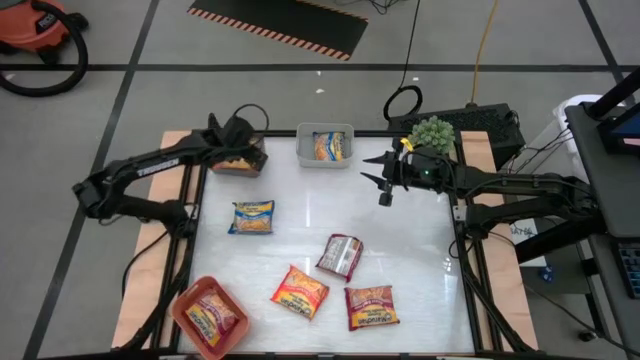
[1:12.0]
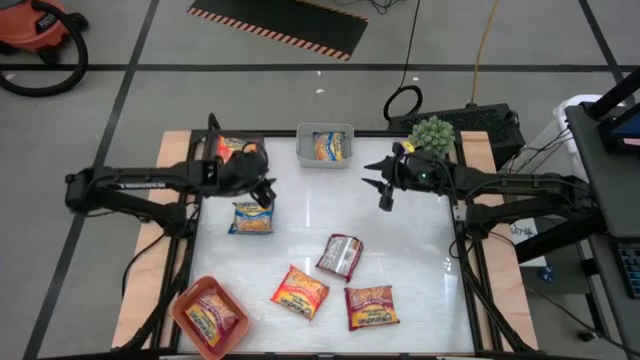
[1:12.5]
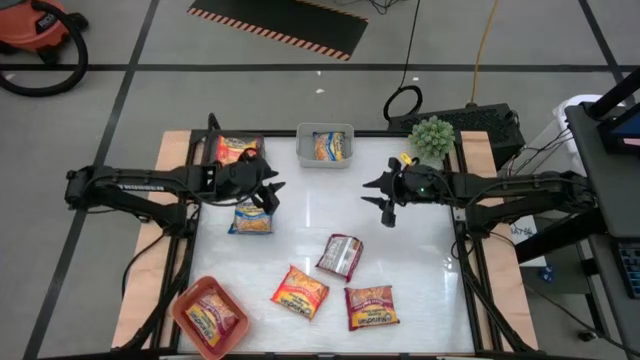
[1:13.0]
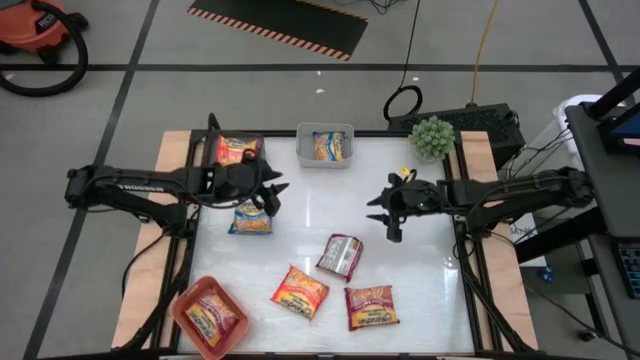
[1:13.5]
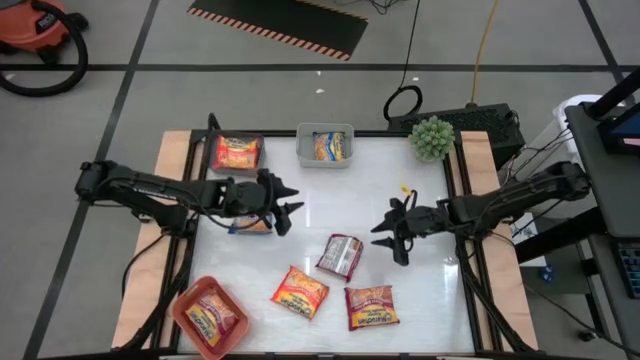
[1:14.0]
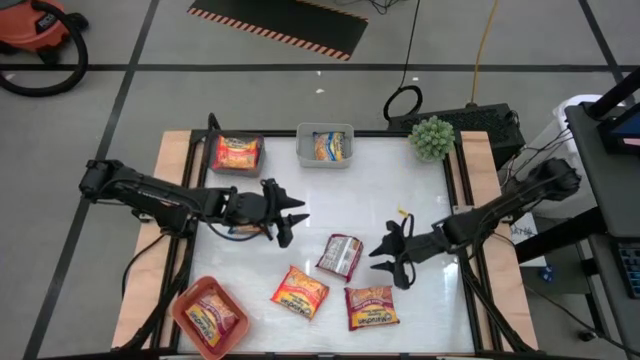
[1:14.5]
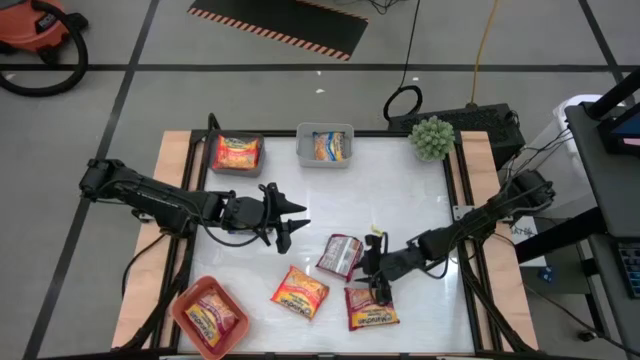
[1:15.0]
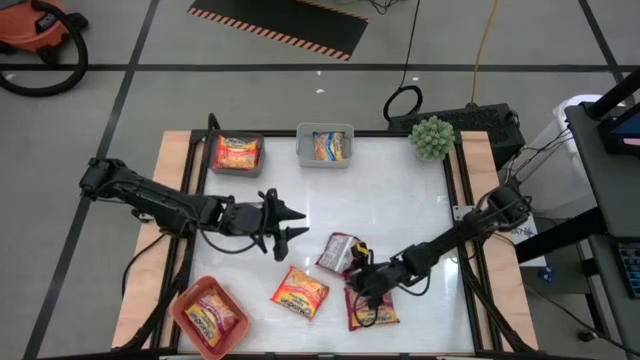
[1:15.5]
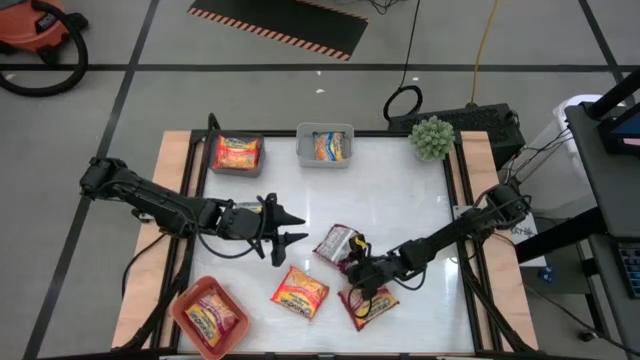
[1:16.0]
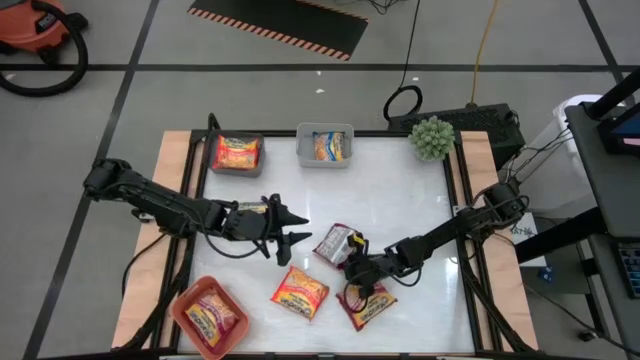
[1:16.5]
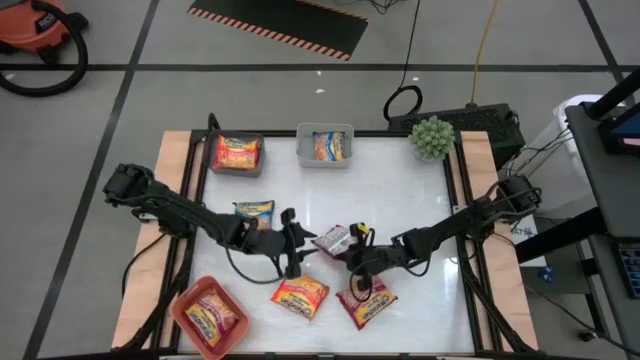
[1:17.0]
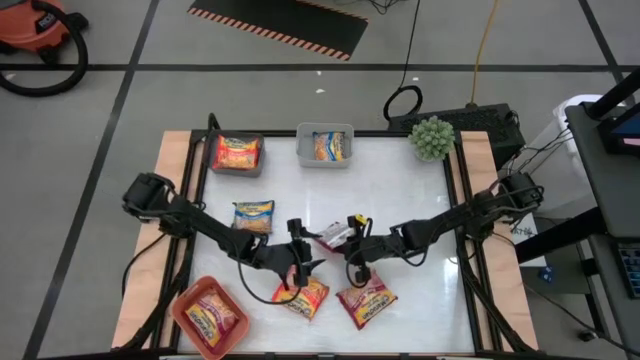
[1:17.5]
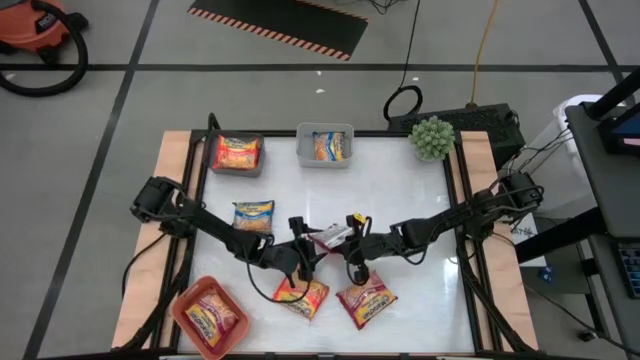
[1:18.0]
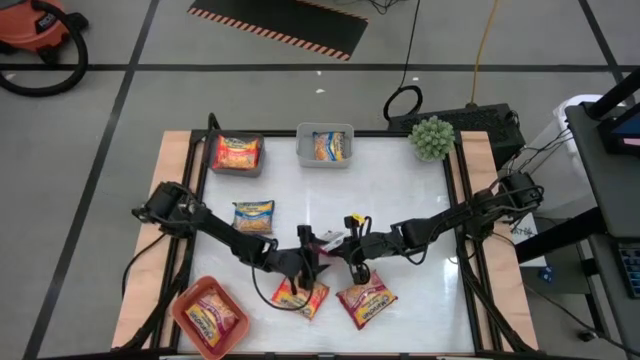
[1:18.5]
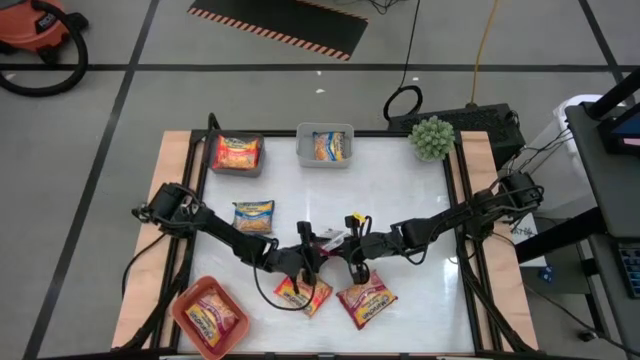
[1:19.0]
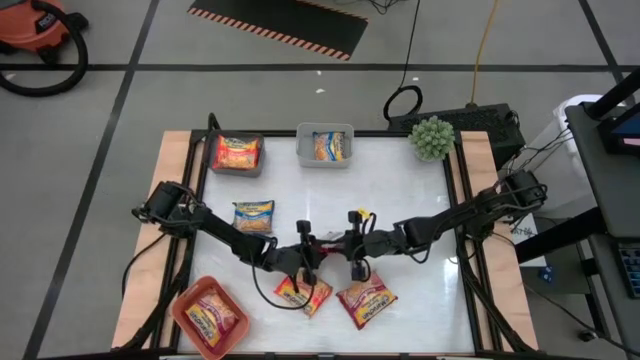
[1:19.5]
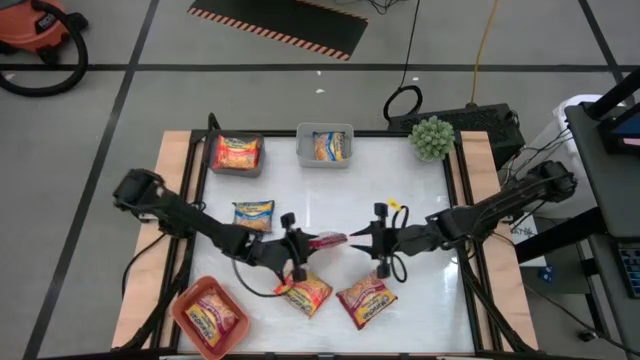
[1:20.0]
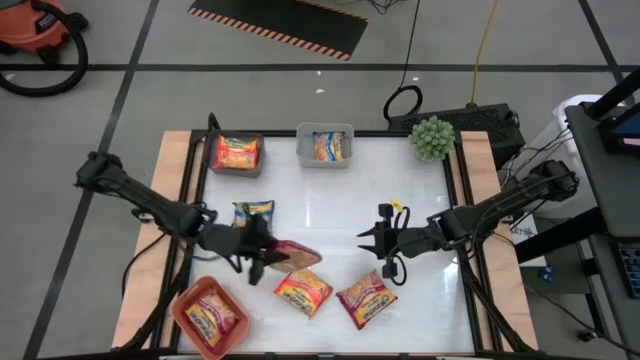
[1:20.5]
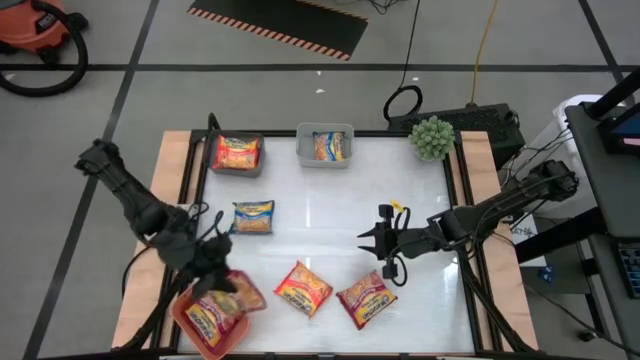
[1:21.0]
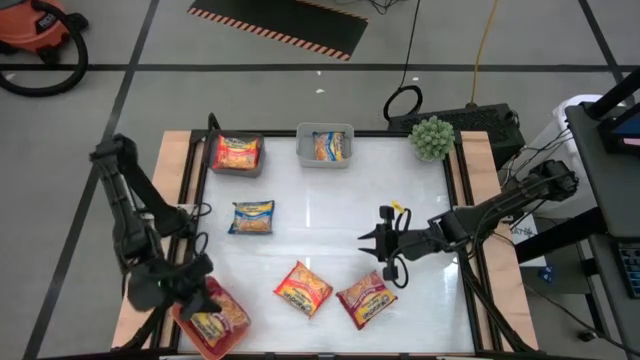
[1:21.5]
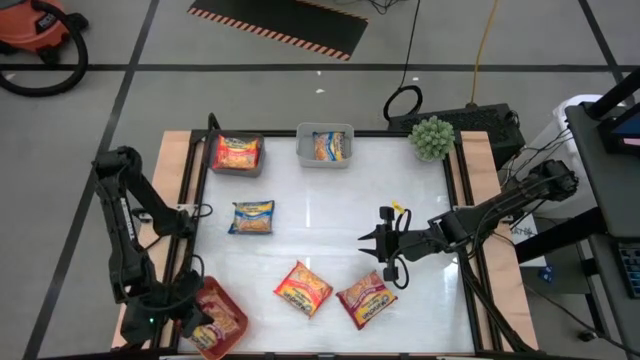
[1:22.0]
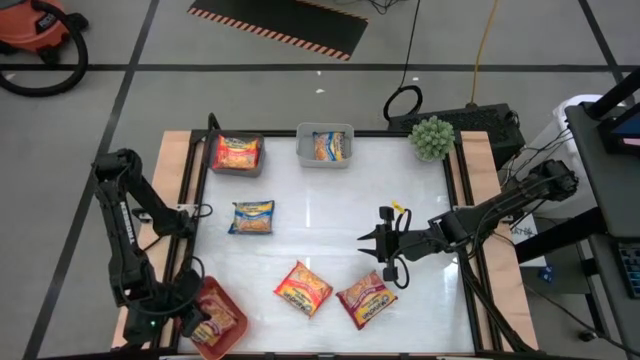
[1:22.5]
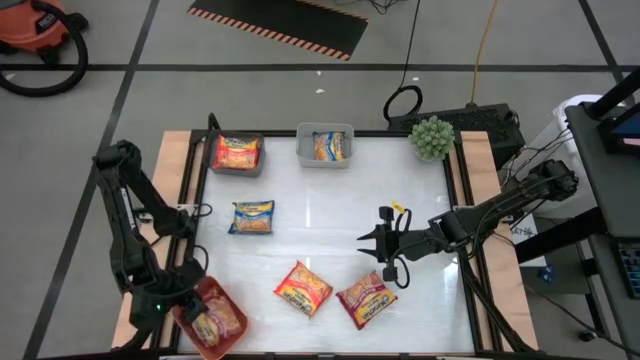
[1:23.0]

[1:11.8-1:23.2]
Task: Sort Maruchan noodles
Put the top red noodle pack into the orange bin

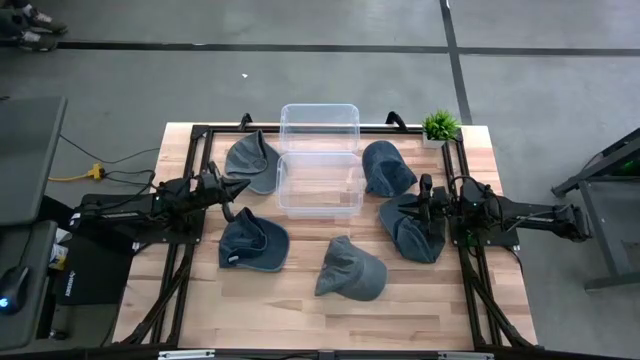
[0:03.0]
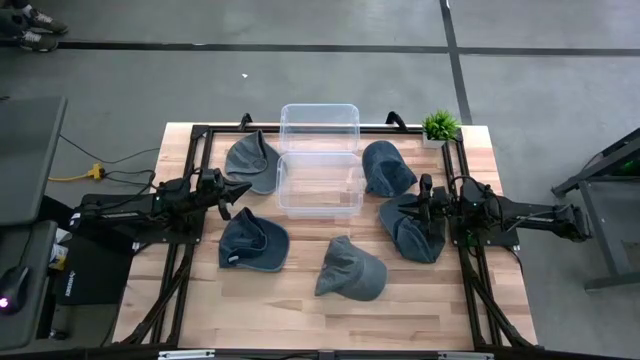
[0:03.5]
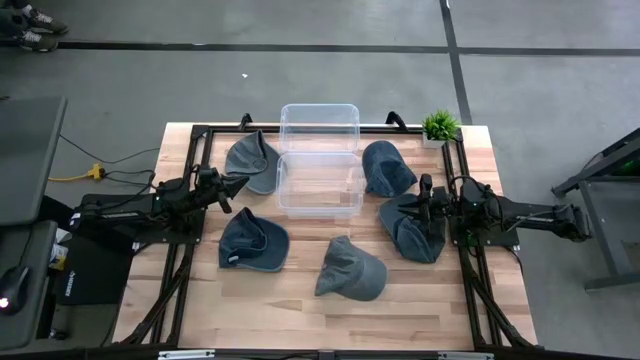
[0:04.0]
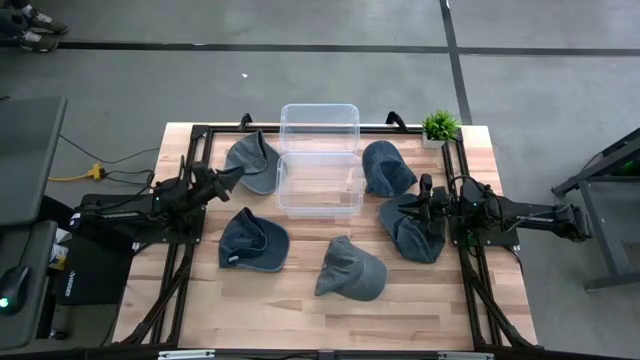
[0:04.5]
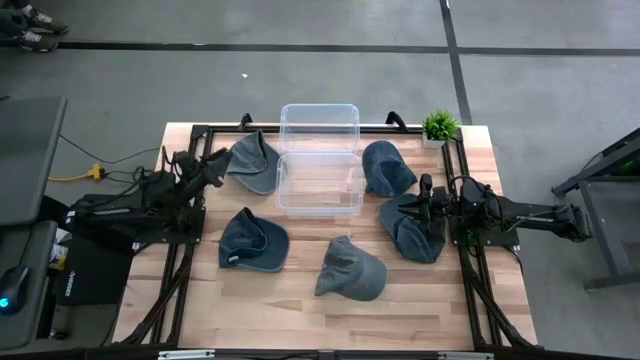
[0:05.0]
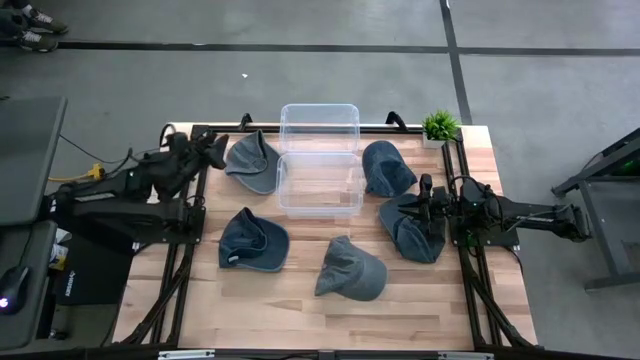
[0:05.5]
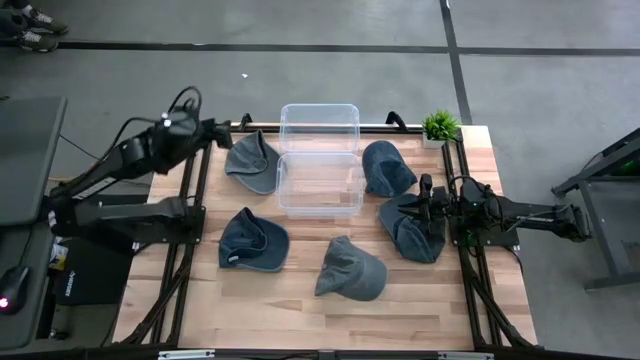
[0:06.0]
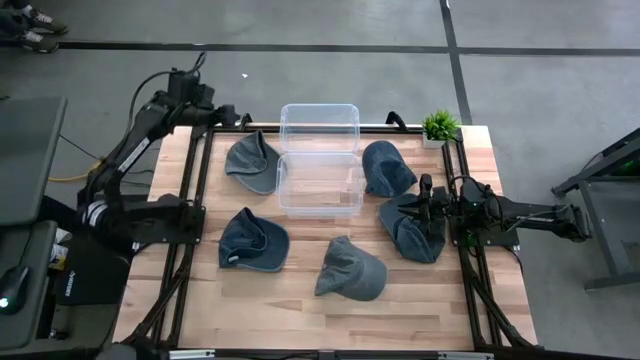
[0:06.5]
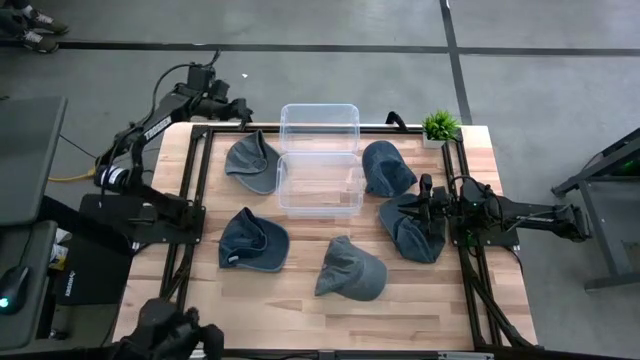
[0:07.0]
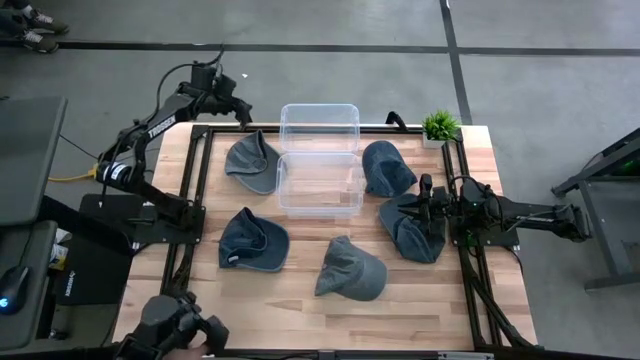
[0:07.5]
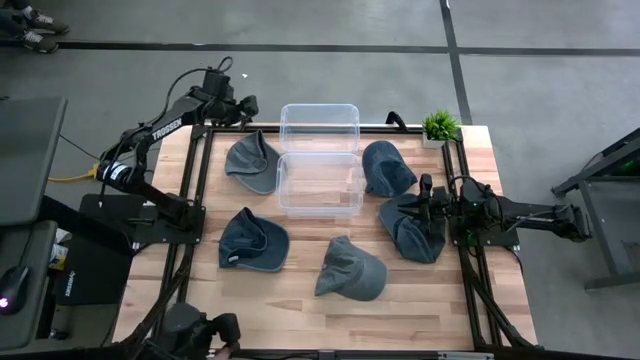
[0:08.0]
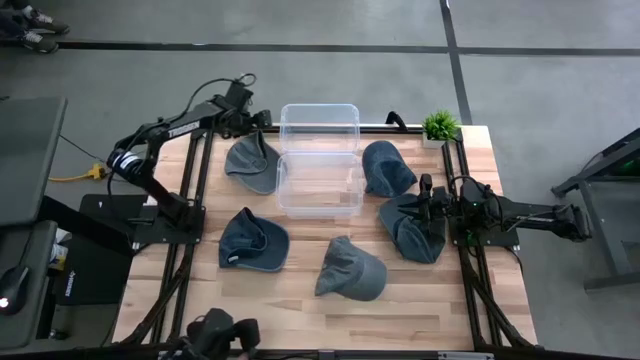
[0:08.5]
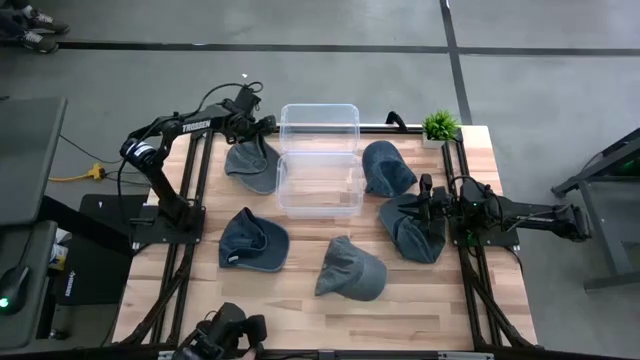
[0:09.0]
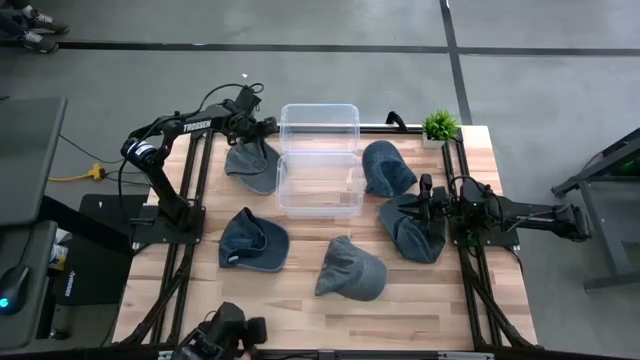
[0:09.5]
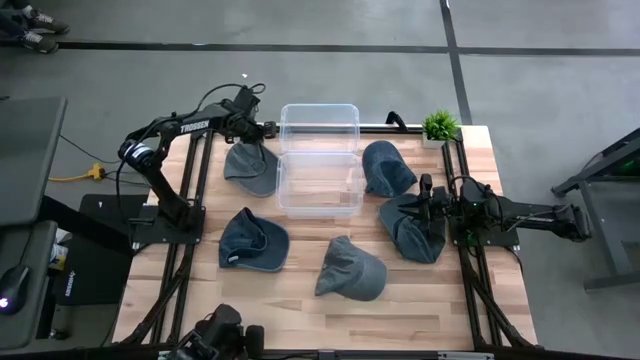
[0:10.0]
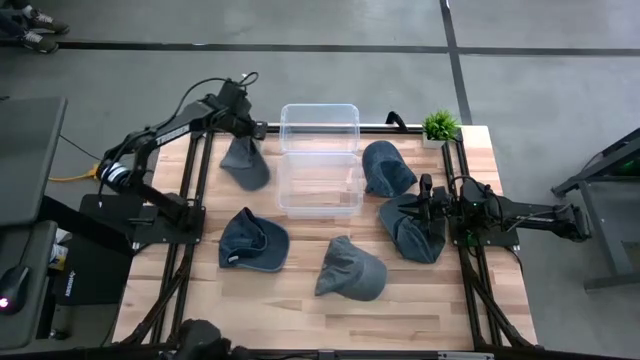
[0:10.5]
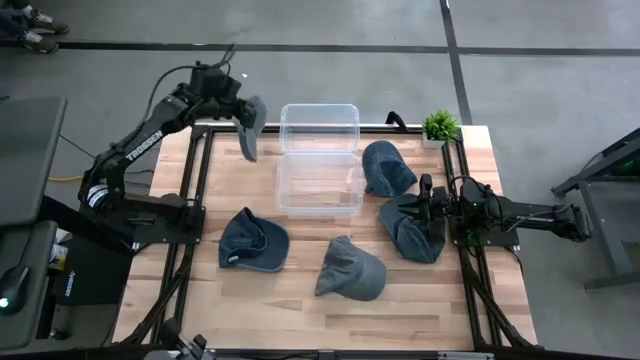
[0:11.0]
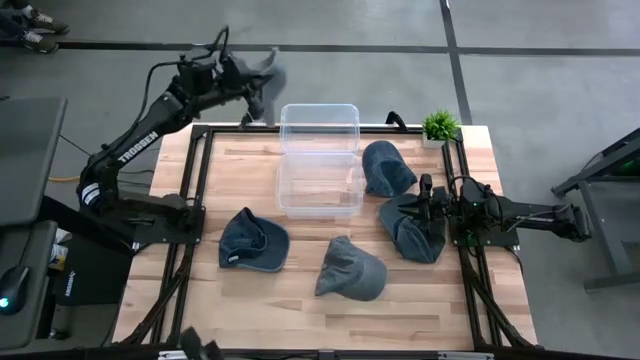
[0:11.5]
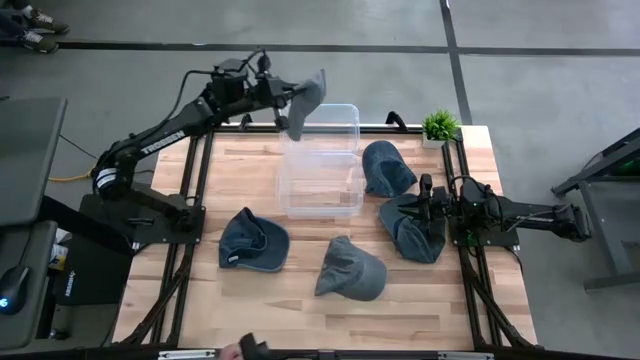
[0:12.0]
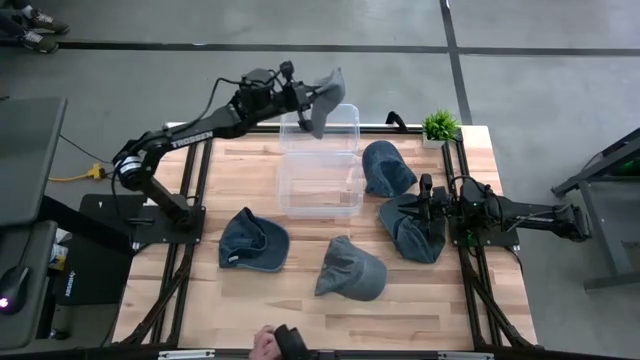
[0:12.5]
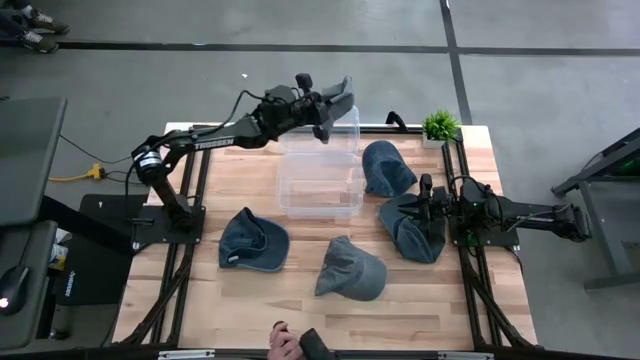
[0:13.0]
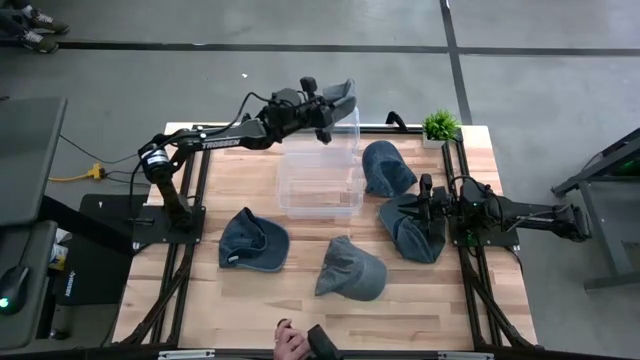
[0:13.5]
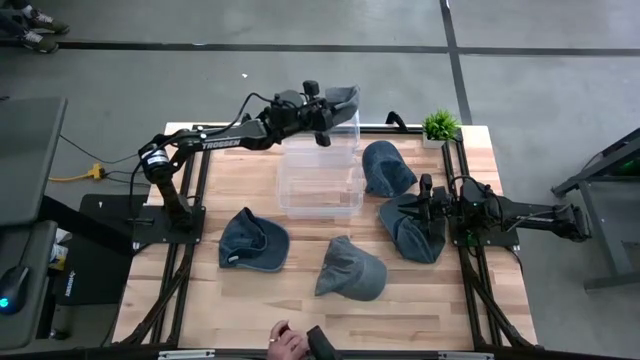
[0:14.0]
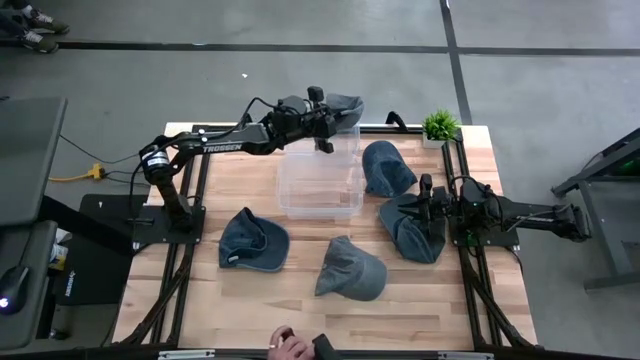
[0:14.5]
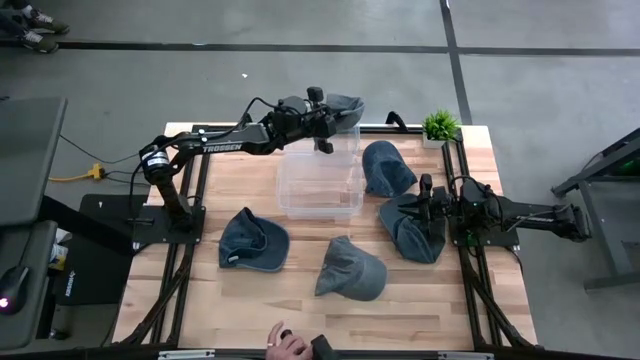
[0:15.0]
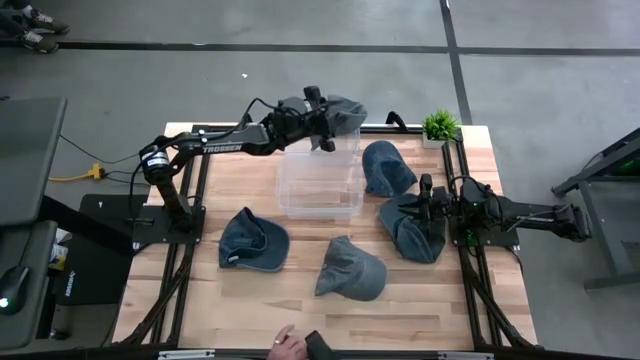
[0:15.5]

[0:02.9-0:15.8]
Task: Pick & Place hat
Put the top gray cap into the top transparent bin
